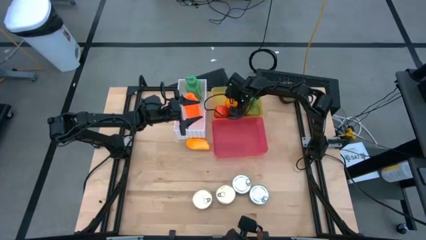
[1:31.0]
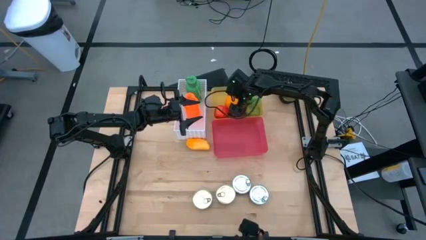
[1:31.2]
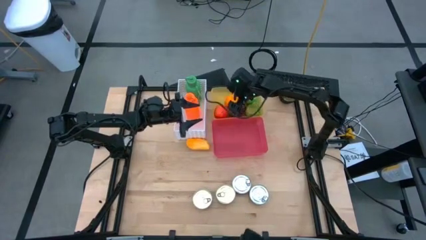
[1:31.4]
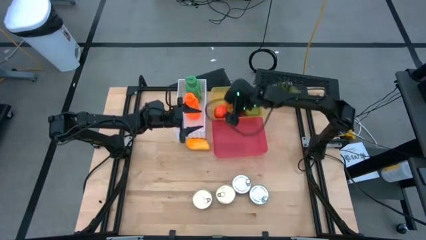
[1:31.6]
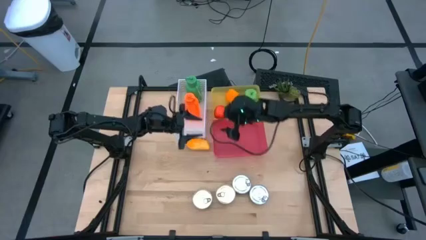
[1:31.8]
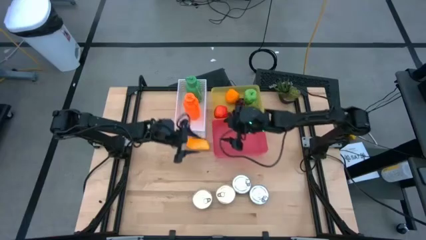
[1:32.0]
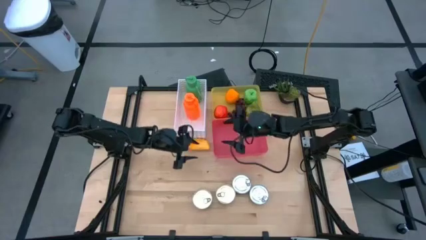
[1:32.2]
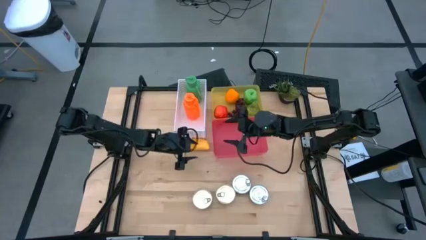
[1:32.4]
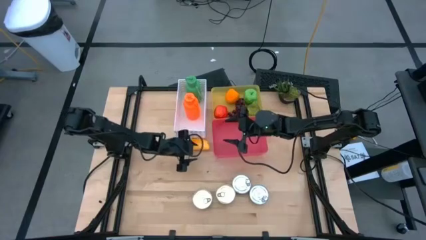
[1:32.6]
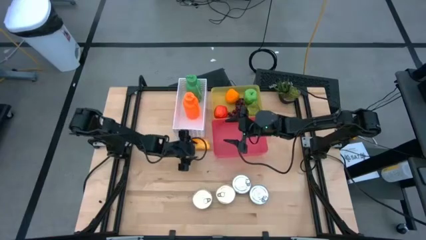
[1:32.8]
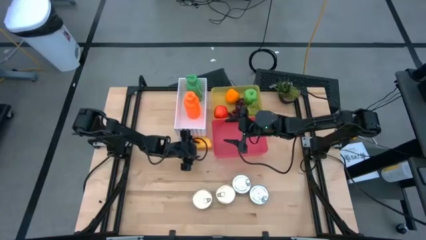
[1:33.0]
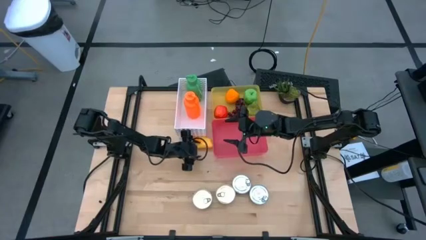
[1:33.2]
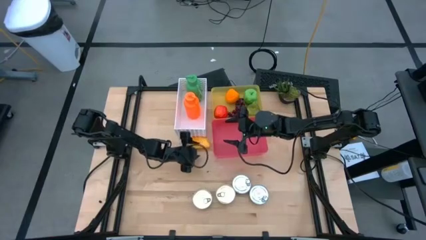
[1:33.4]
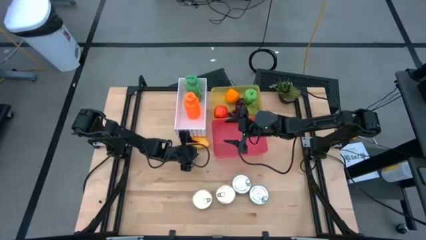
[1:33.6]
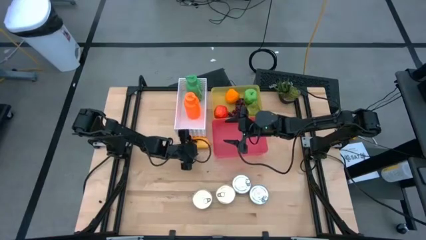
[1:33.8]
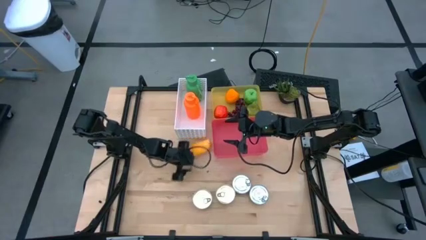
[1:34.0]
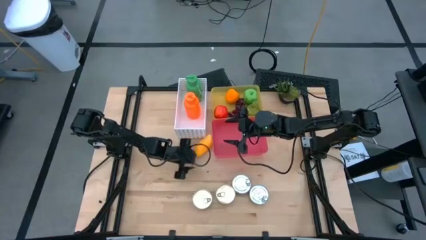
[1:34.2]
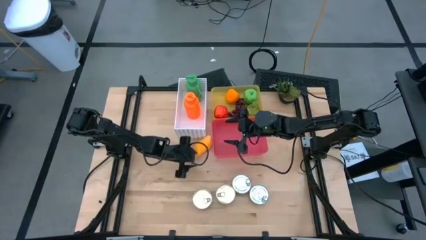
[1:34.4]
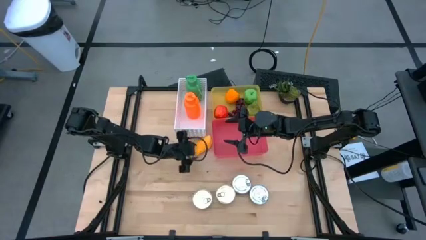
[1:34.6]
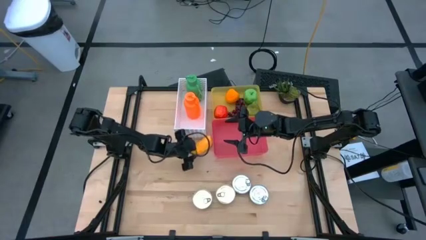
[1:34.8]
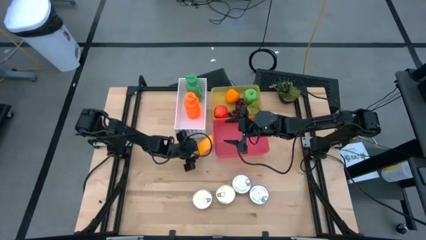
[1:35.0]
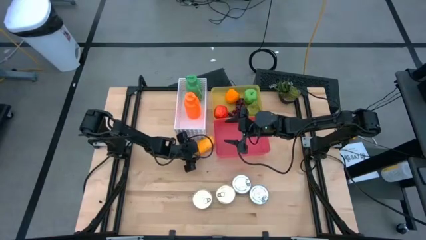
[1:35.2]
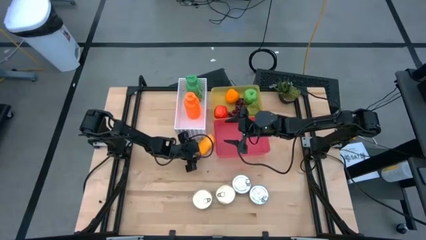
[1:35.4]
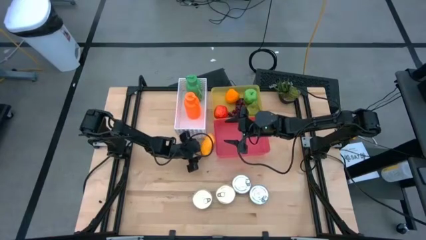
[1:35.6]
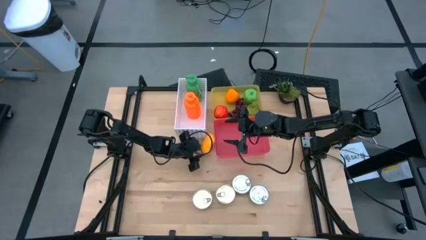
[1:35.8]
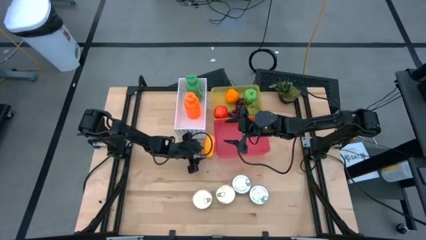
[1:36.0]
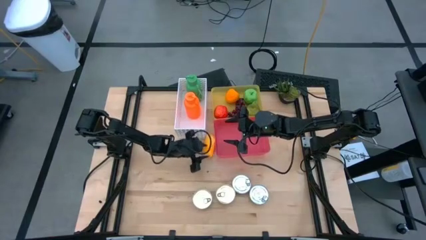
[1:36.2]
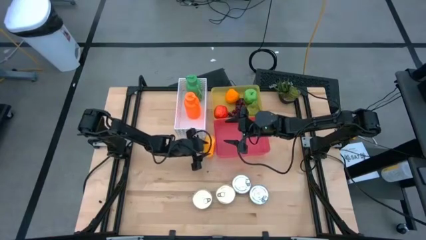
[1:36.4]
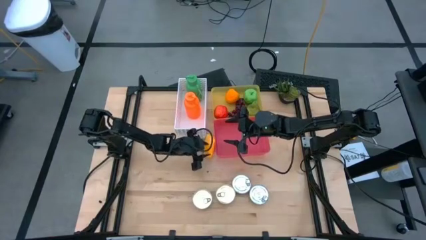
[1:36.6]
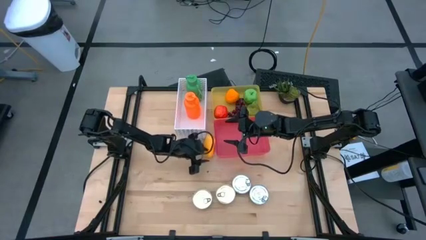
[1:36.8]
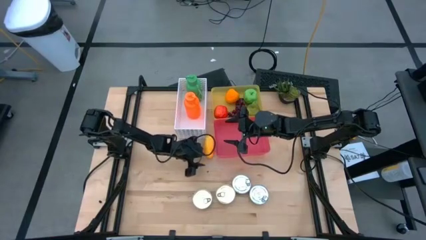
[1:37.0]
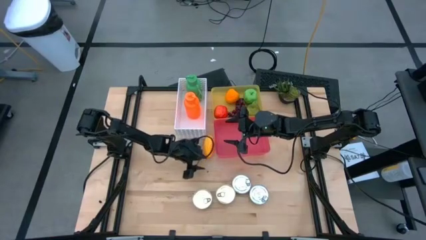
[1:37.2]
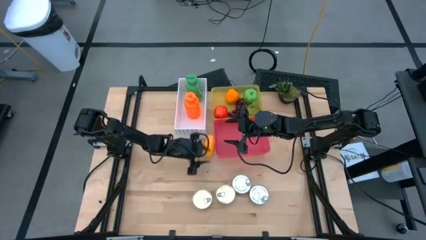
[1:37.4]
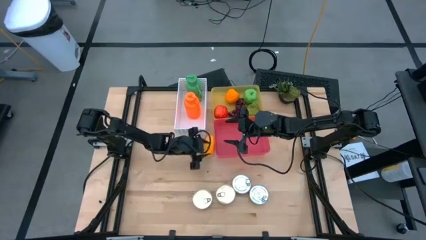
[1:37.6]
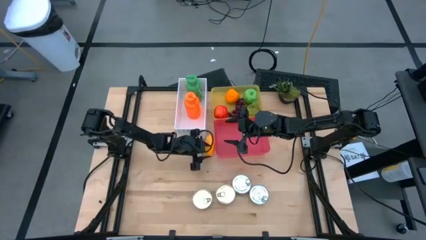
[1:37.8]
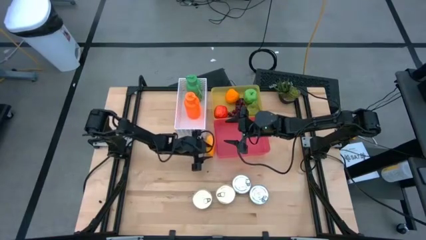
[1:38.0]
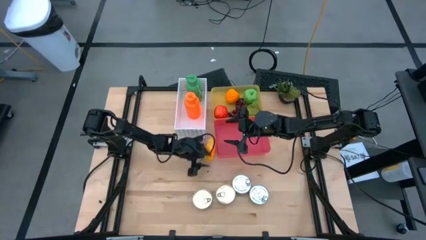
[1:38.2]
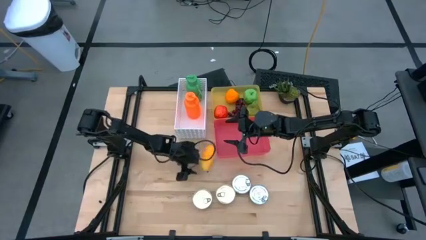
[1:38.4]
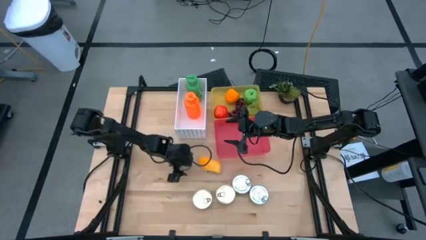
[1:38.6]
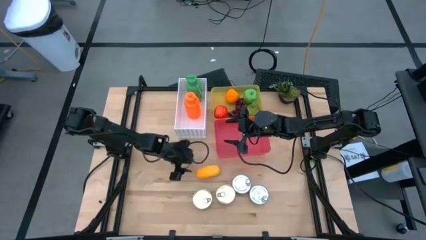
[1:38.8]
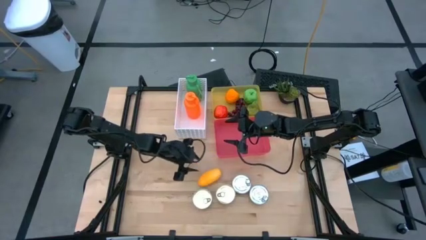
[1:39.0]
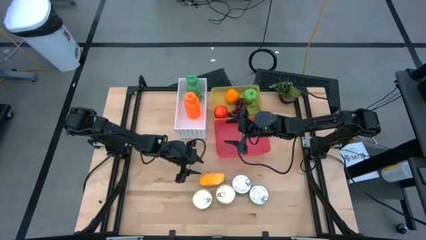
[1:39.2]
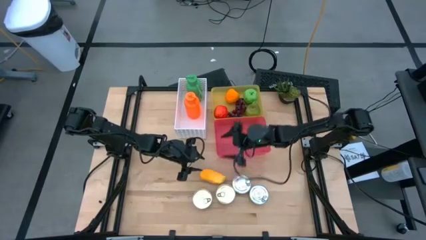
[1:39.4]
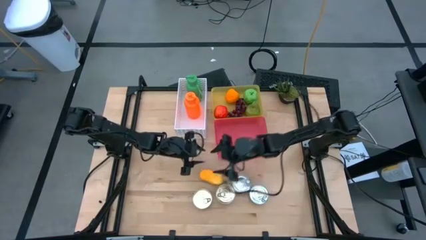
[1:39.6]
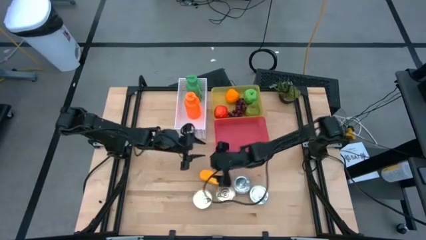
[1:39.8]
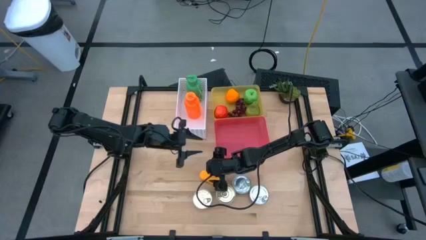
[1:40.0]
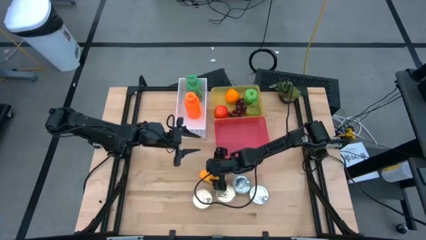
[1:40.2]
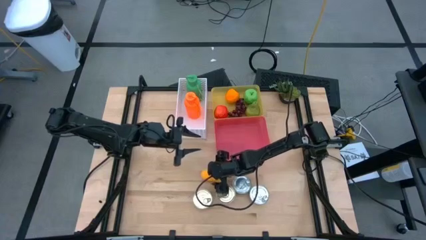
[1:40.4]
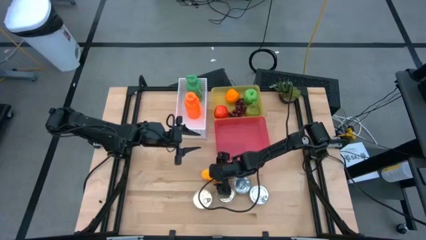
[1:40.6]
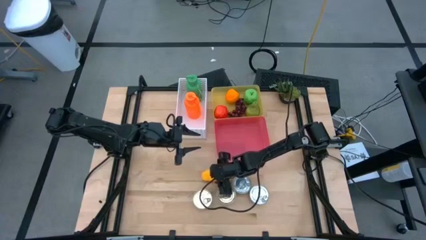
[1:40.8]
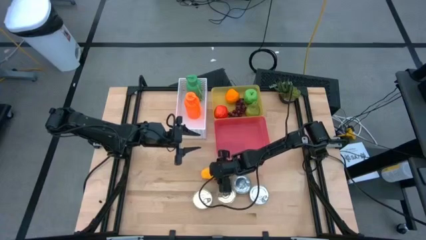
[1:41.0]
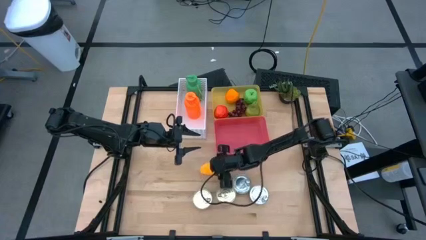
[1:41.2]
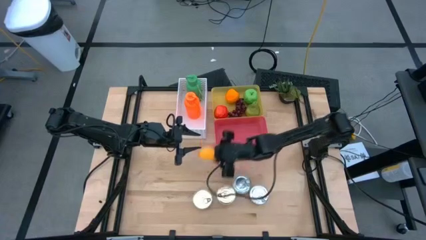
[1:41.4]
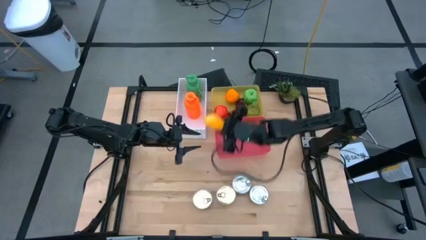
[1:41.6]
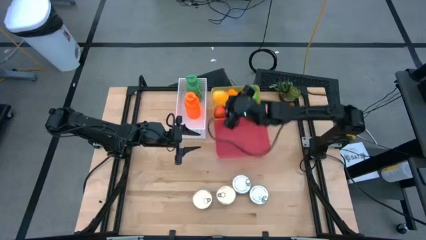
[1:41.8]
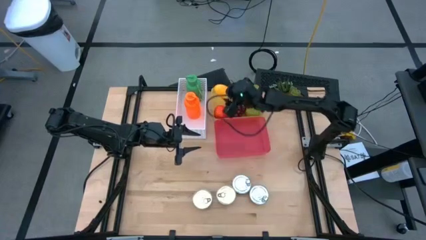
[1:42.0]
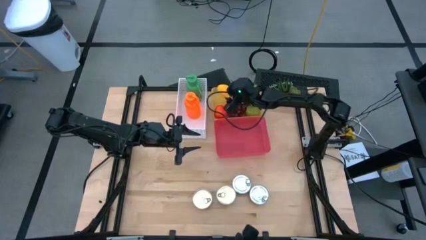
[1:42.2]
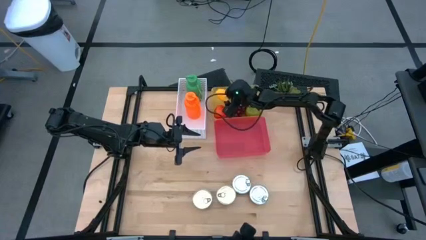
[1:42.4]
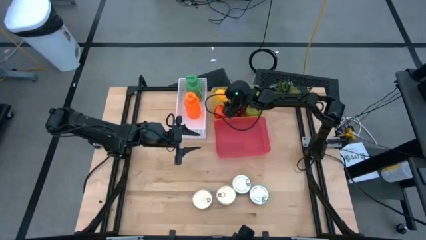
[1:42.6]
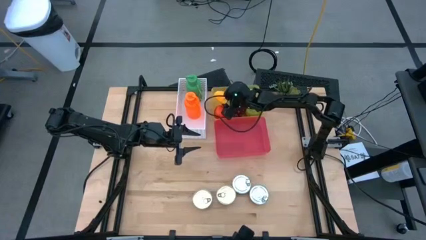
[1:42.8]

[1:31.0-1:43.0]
Task: Pick & Place Food Item
Put the yellow mango into the yellow bin

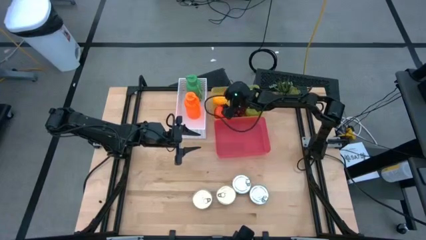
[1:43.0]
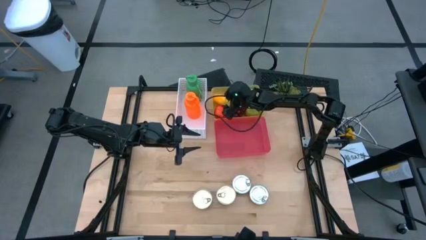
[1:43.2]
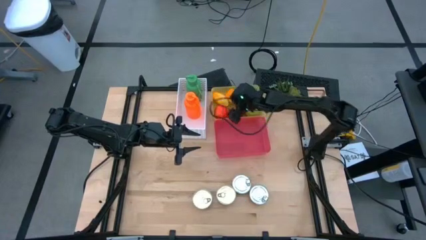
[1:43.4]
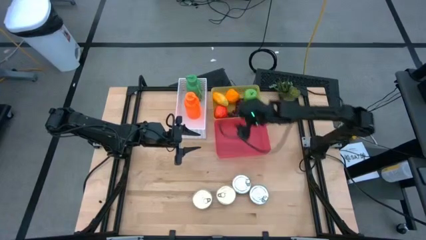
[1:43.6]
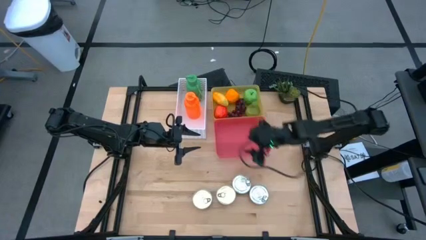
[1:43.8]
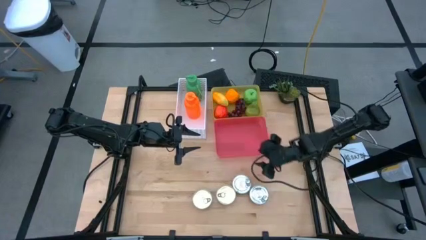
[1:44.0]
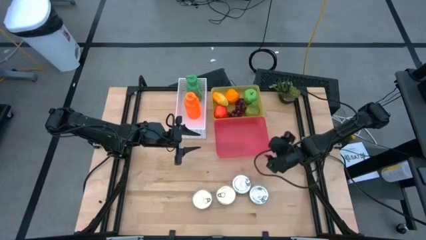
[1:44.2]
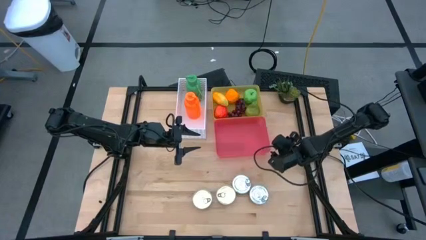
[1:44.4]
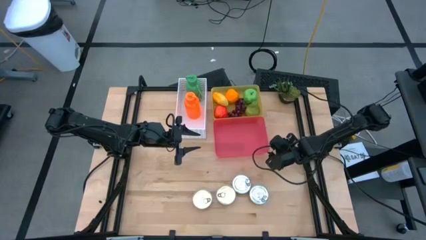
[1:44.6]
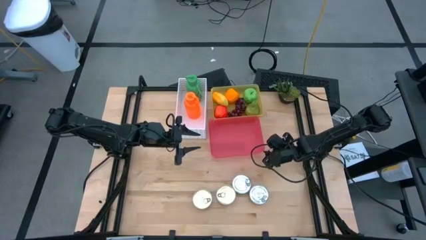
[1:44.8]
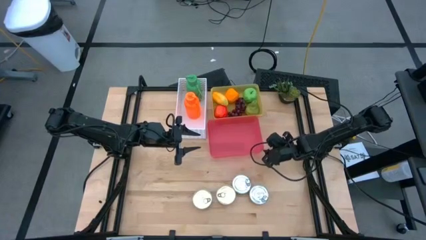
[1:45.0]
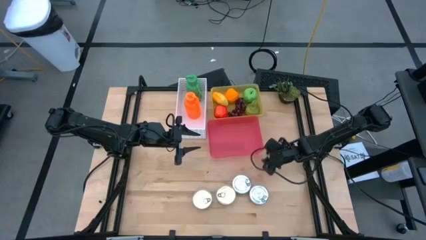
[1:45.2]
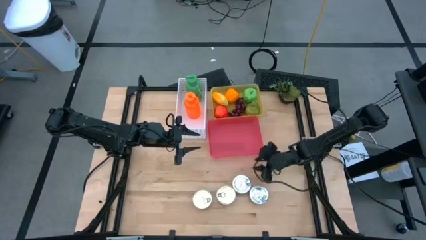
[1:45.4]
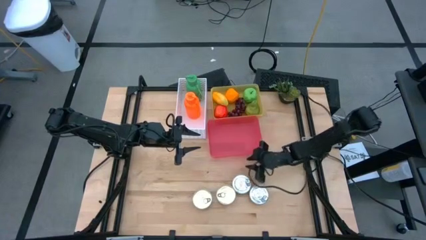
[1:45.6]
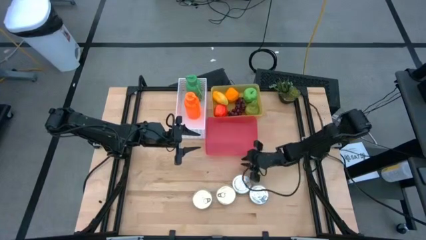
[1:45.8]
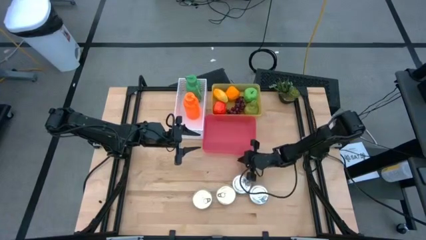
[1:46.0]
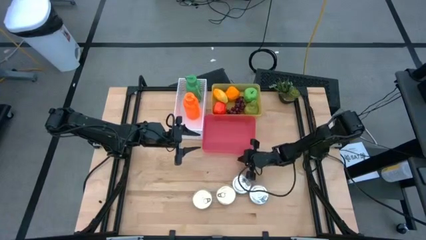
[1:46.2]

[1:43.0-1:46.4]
Adjust the red bin
